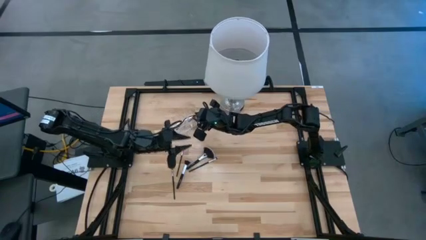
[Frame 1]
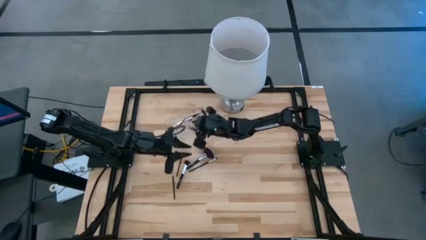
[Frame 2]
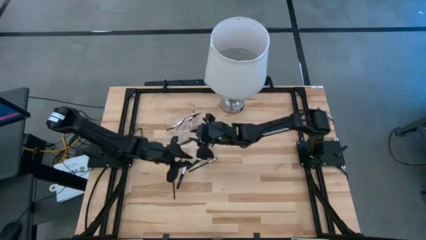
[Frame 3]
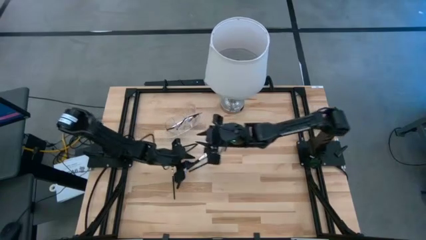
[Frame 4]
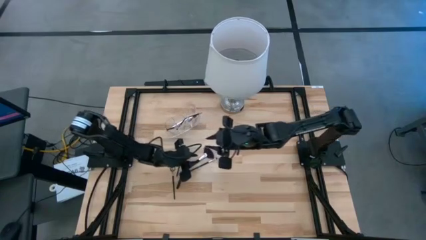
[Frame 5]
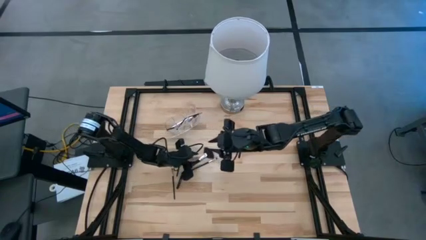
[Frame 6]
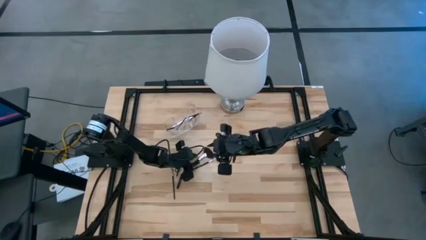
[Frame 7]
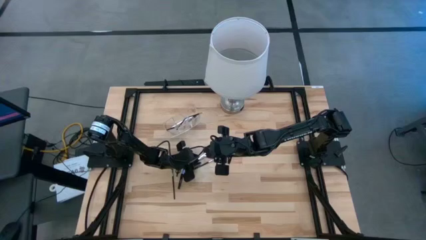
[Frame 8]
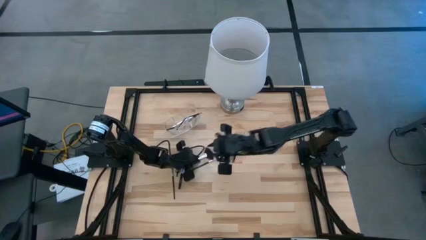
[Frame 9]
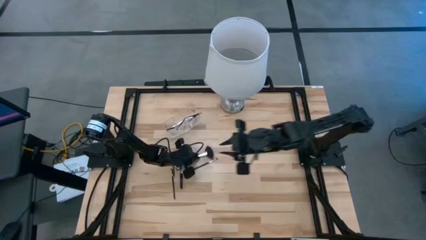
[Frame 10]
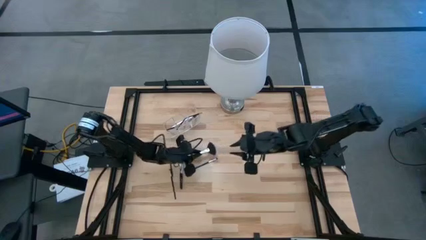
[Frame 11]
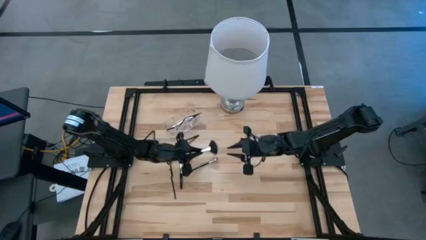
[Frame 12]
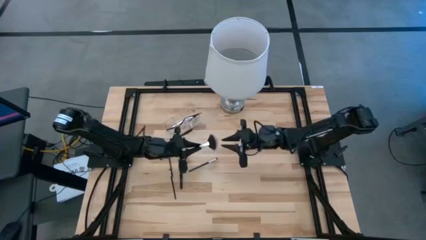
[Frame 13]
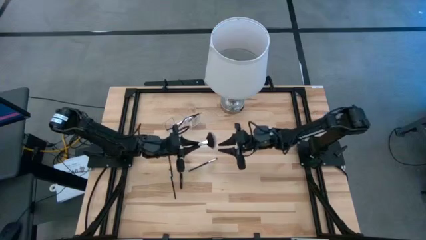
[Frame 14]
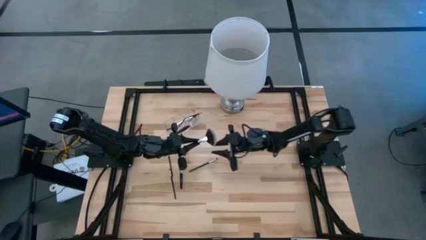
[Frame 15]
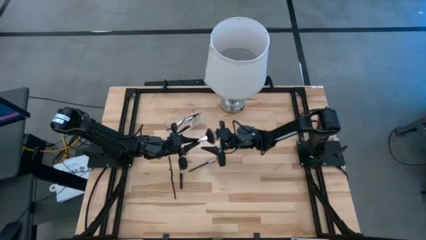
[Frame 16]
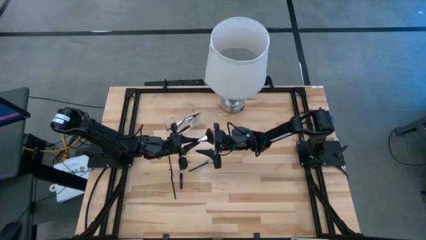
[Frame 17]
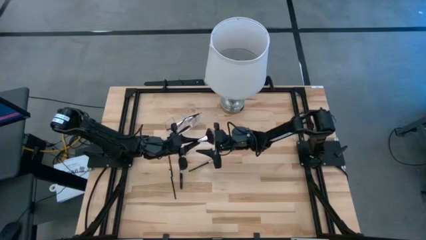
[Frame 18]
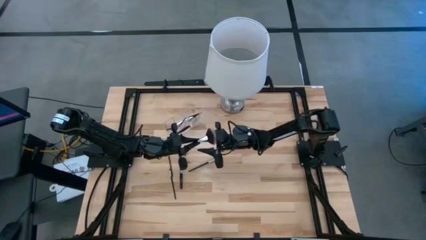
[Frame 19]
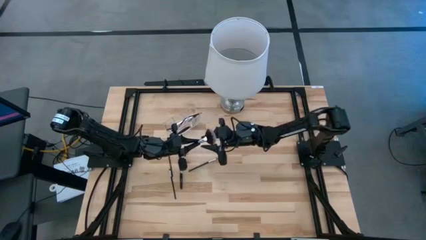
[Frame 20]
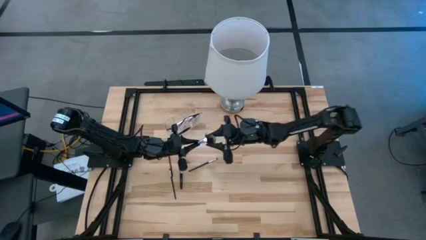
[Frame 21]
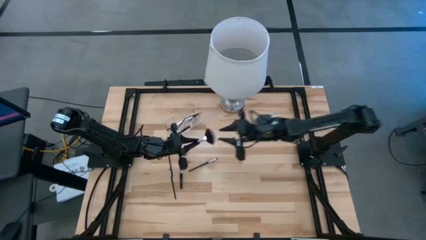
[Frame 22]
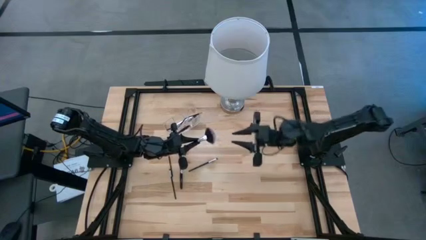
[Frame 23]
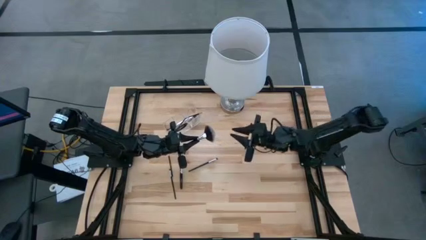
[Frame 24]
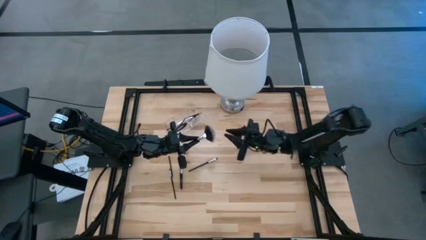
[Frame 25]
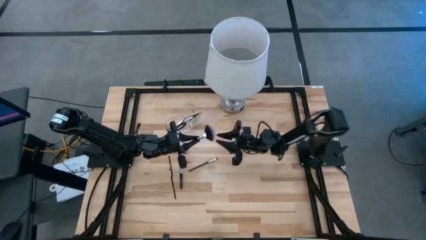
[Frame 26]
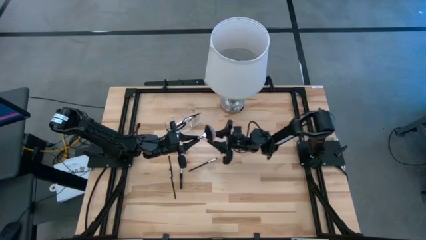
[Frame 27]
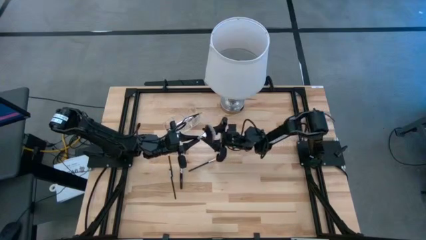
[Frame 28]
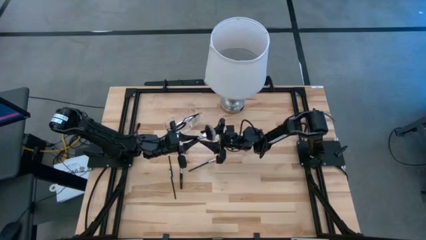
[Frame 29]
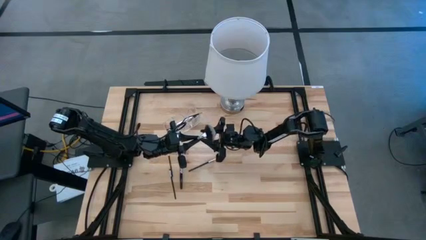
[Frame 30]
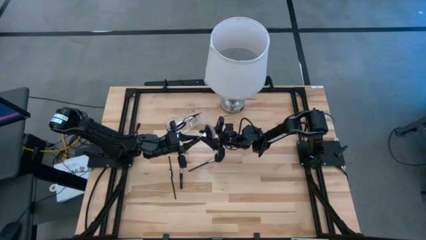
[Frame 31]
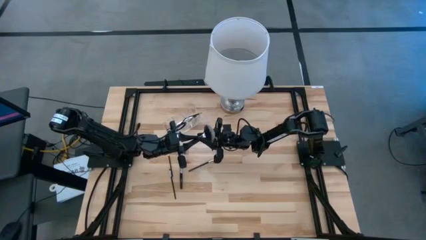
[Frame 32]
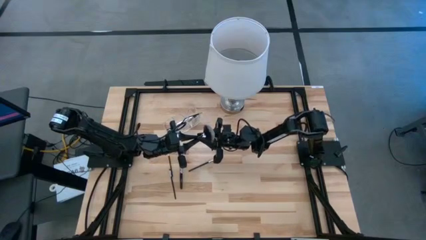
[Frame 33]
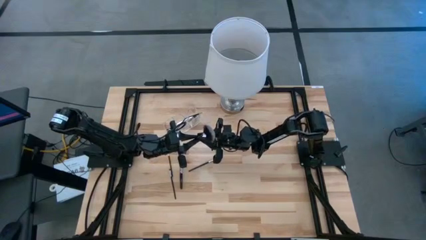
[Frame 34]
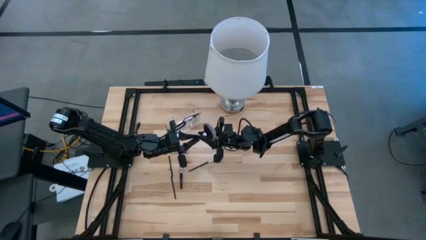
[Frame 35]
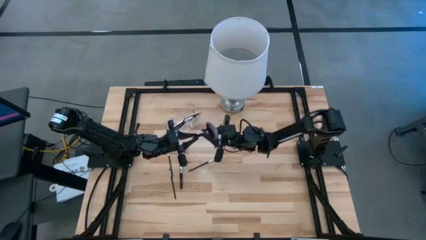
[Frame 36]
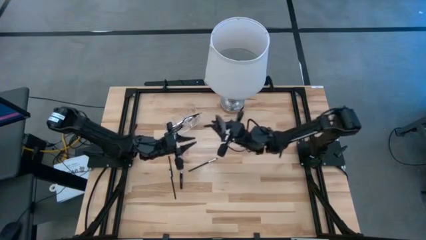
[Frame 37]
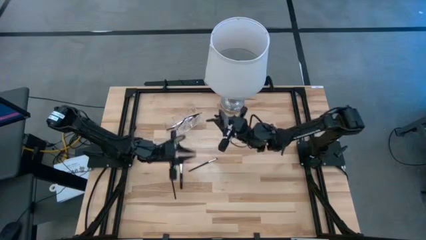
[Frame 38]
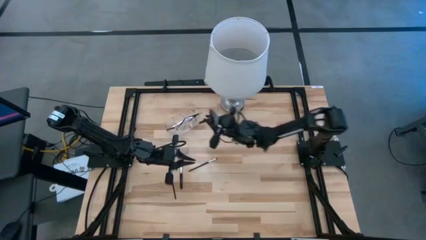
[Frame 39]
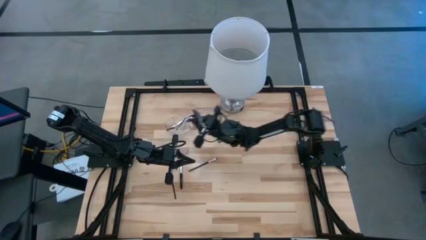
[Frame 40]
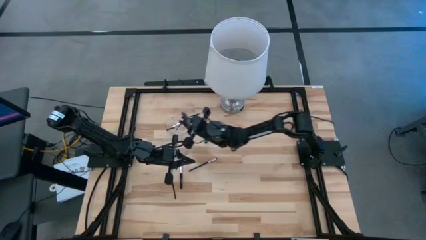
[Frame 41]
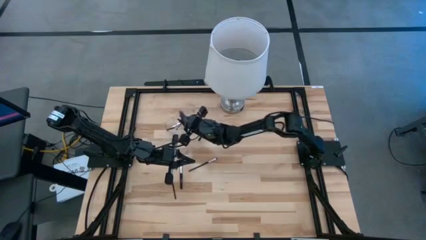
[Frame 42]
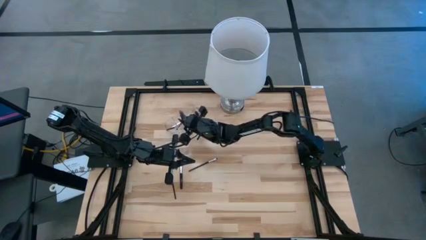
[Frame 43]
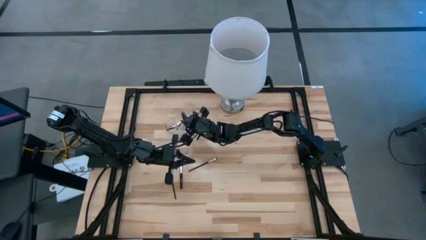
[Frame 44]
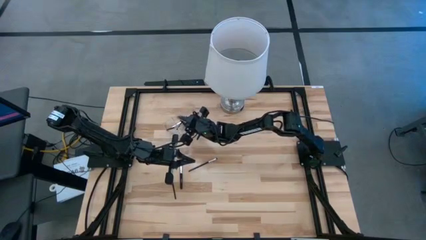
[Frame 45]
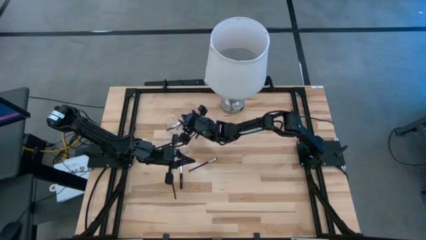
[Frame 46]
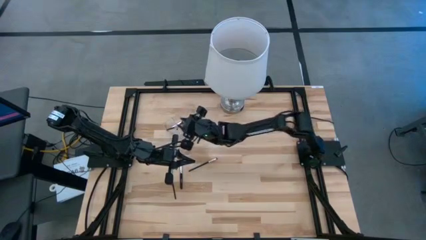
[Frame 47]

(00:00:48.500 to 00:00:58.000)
Task: Put items in baskets/containers
Put the black highlighter brush into the transparent organizer

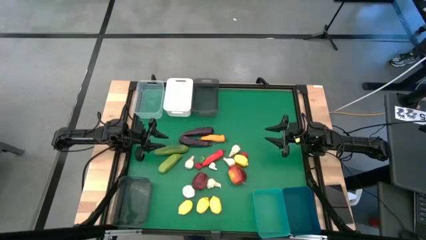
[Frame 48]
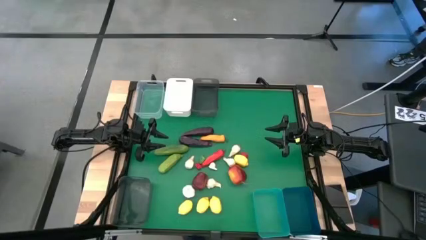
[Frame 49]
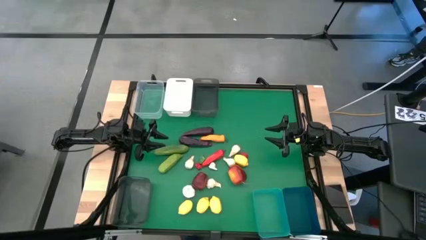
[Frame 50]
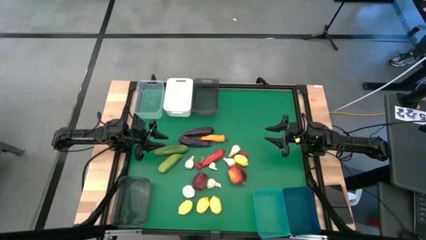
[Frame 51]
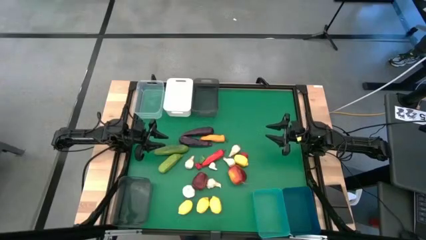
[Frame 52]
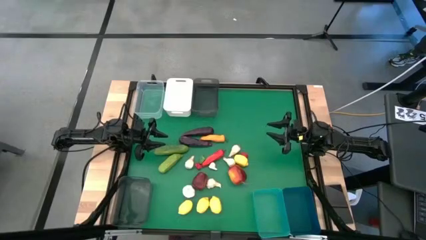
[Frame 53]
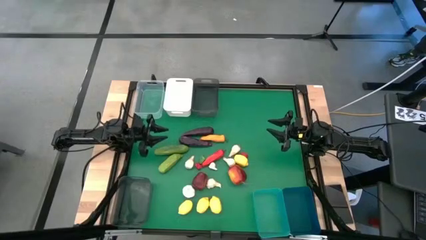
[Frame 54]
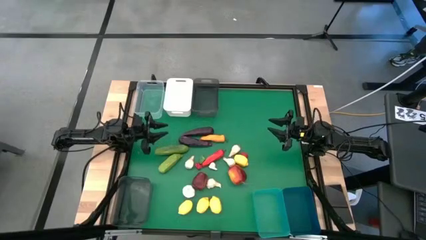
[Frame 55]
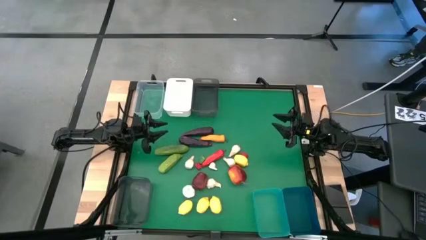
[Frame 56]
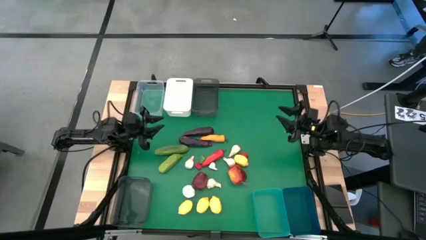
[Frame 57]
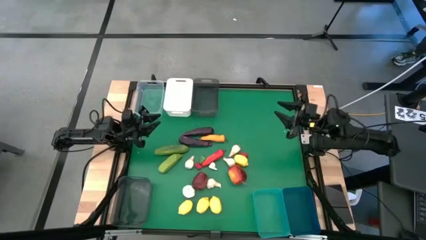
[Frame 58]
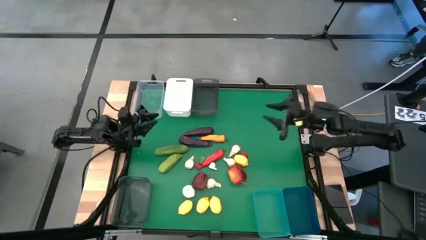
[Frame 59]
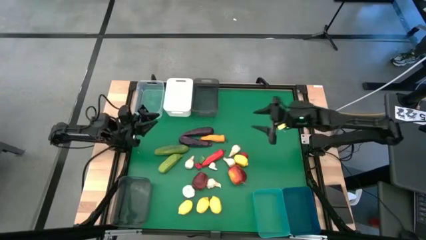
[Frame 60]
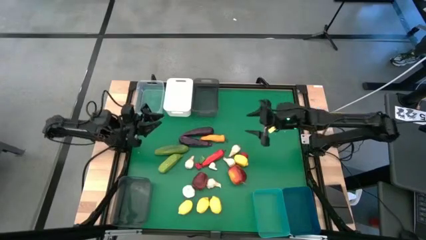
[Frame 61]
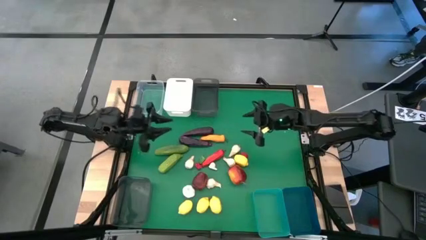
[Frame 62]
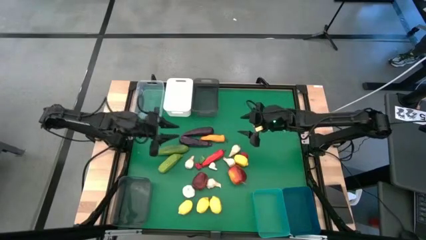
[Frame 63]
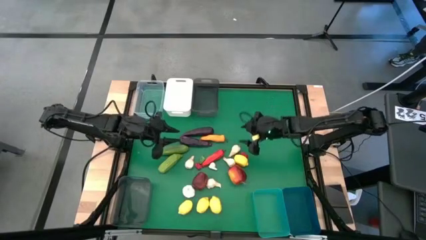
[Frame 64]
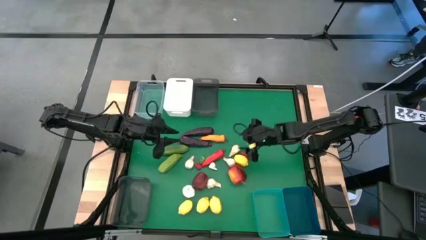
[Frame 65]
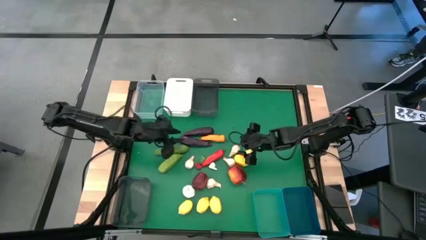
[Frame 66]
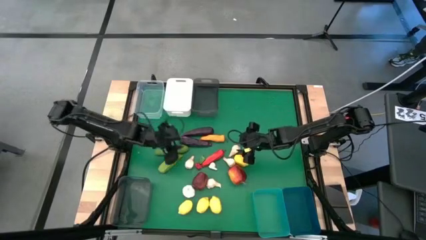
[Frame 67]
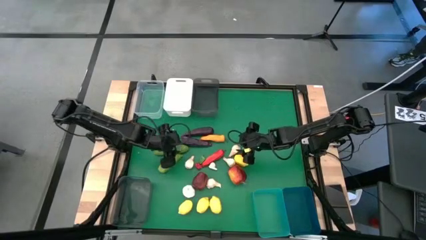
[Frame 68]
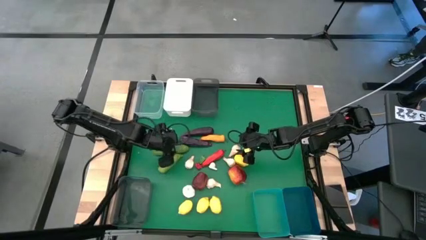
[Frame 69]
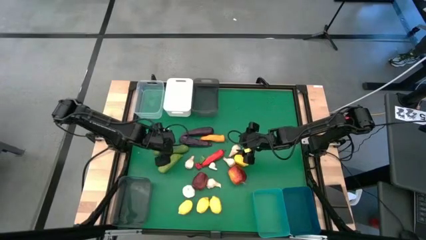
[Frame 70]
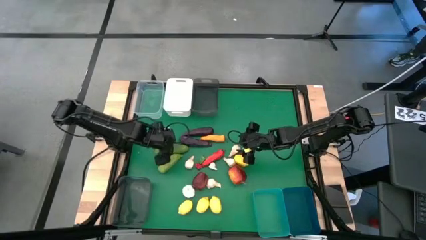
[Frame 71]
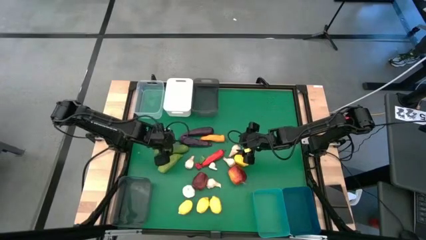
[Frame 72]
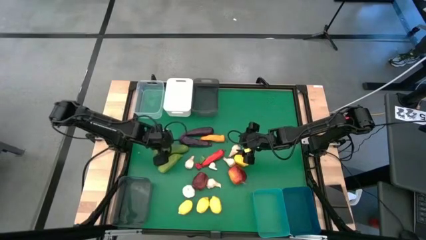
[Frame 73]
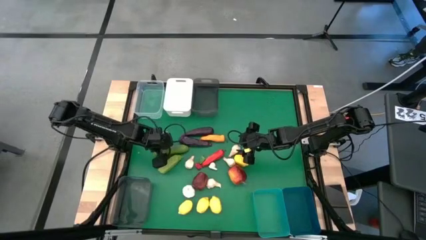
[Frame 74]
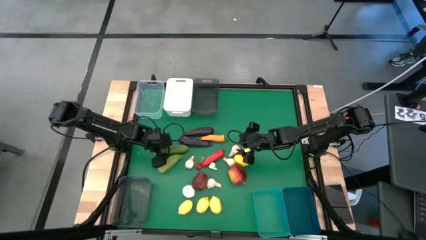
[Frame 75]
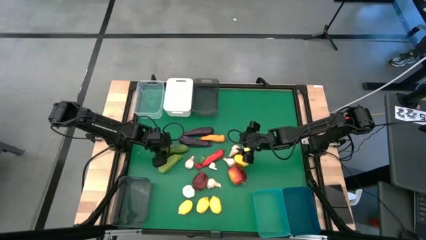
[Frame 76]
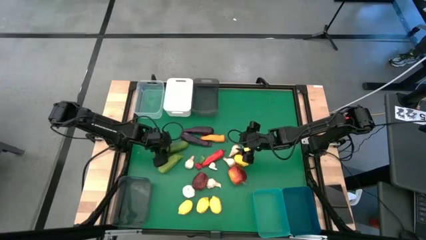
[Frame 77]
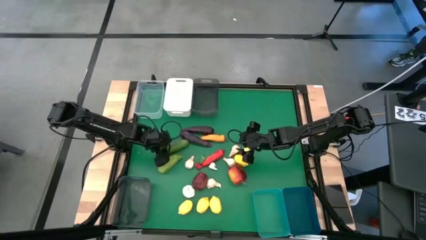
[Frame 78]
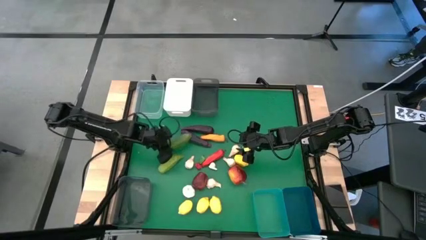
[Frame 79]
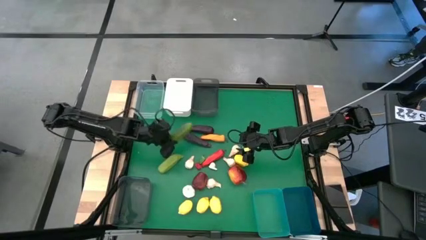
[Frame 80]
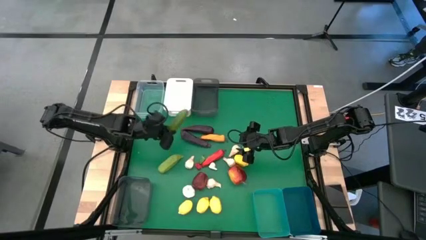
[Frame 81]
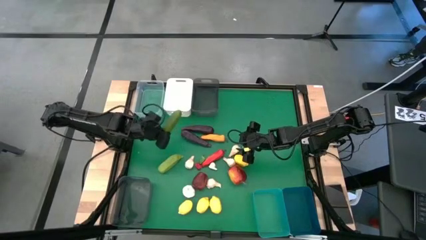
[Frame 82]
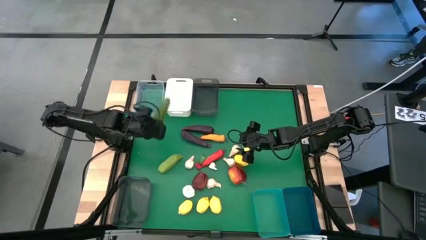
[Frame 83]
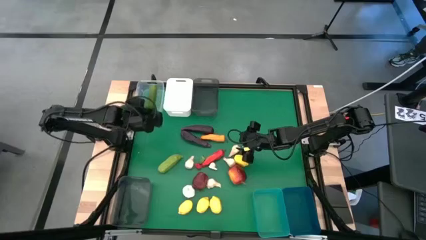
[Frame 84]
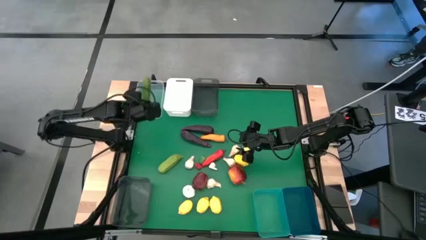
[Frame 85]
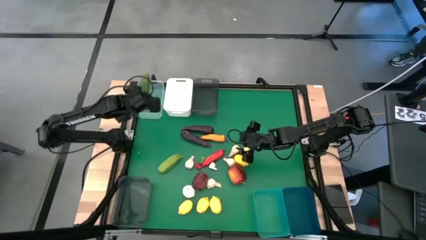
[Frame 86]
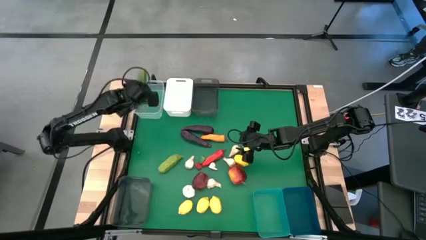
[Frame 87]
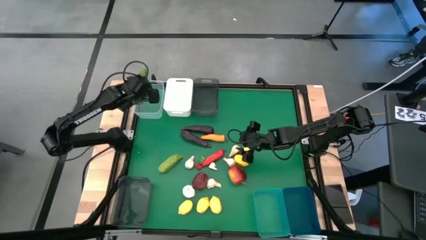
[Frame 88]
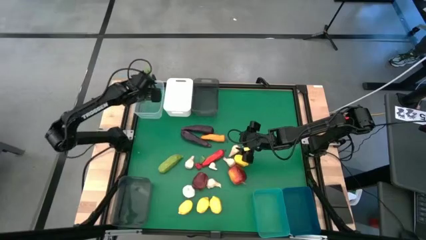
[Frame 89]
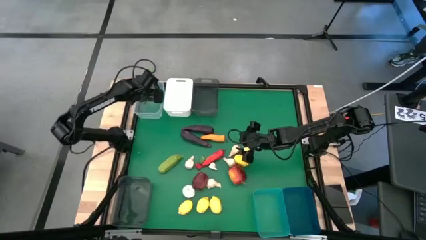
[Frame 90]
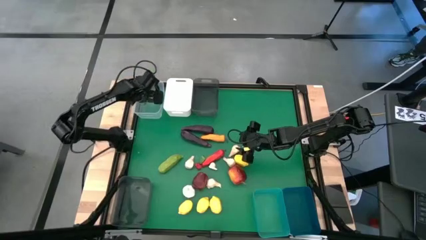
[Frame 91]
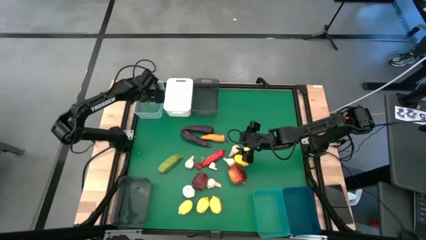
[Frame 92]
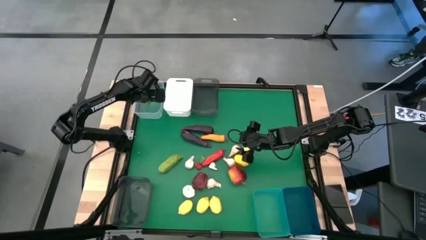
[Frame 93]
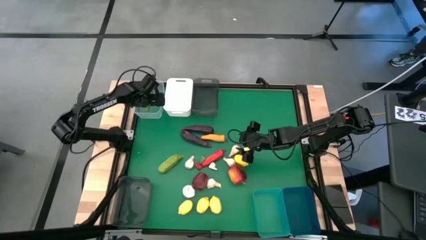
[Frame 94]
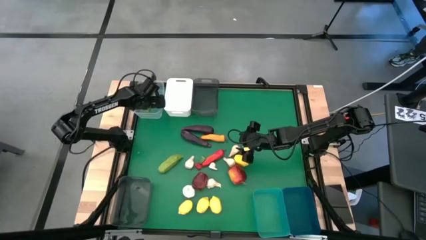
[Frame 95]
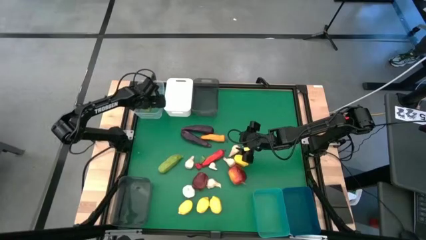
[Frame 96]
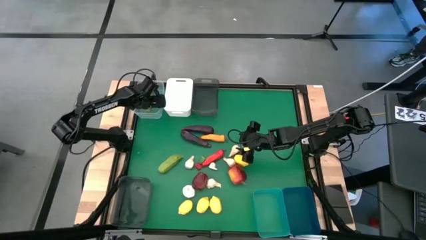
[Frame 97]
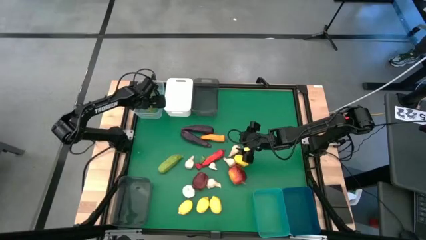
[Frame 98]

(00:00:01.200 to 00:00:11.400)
Task: Sort produce into baskets
Put the green cucumber into the transparent bin
